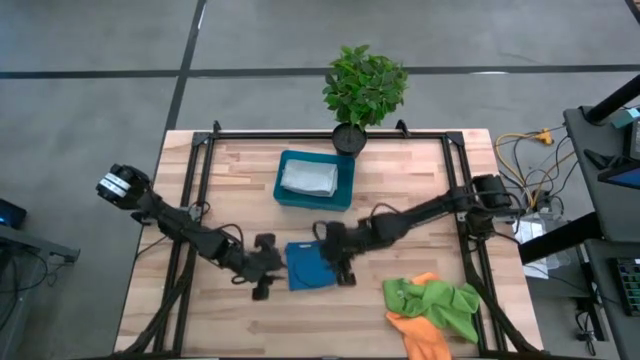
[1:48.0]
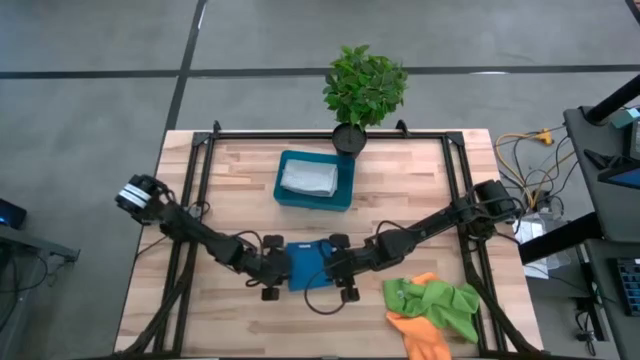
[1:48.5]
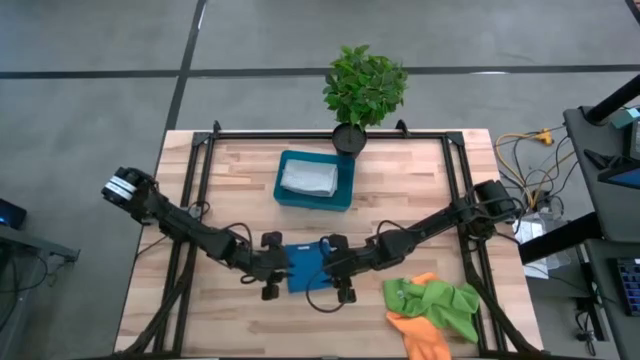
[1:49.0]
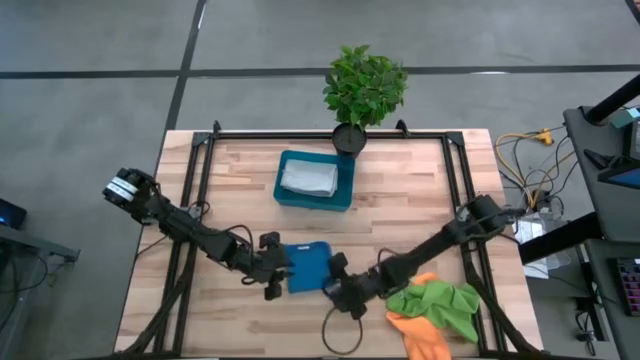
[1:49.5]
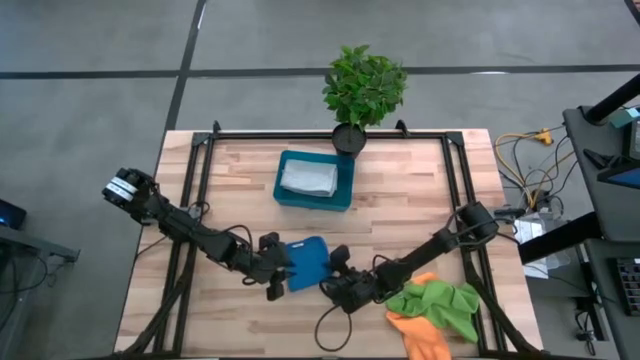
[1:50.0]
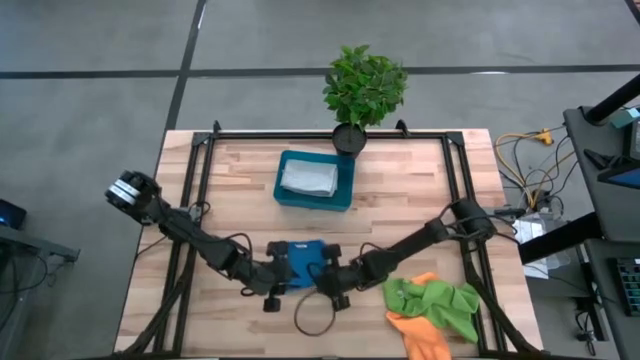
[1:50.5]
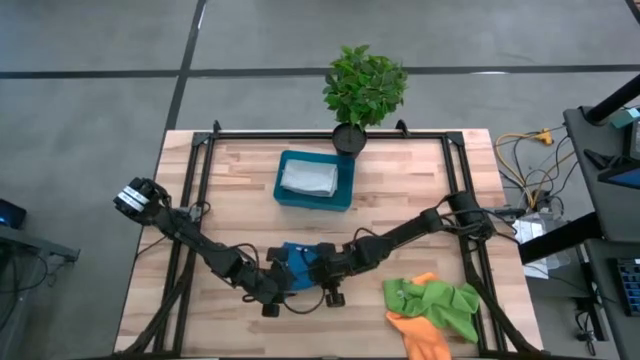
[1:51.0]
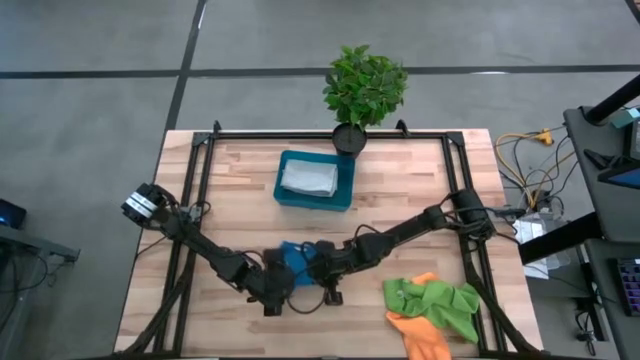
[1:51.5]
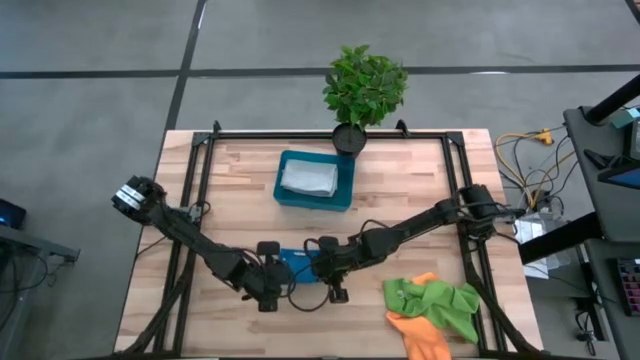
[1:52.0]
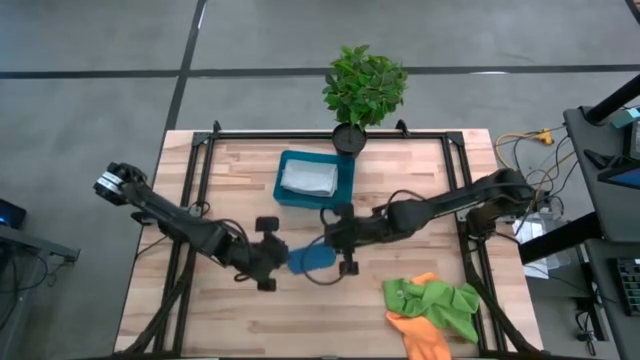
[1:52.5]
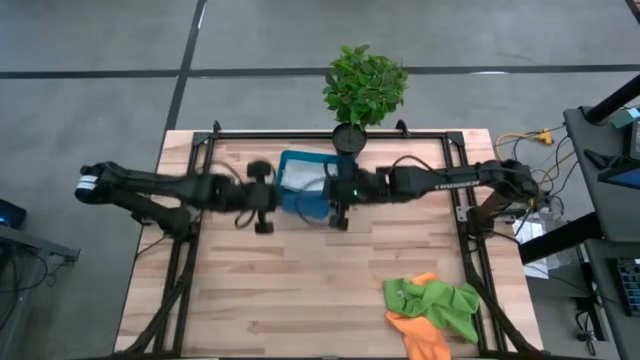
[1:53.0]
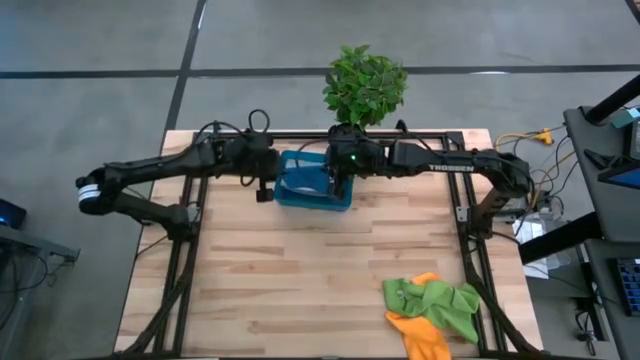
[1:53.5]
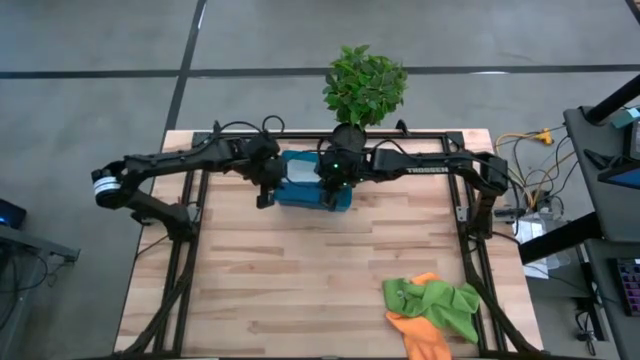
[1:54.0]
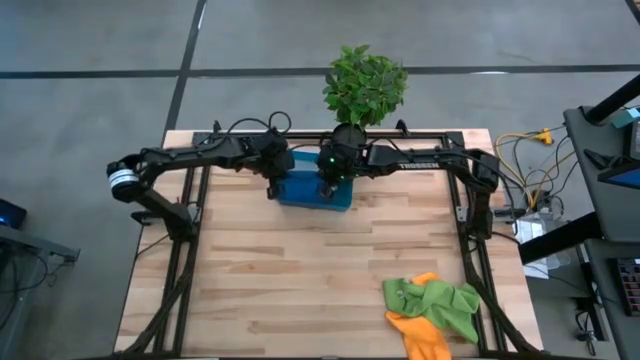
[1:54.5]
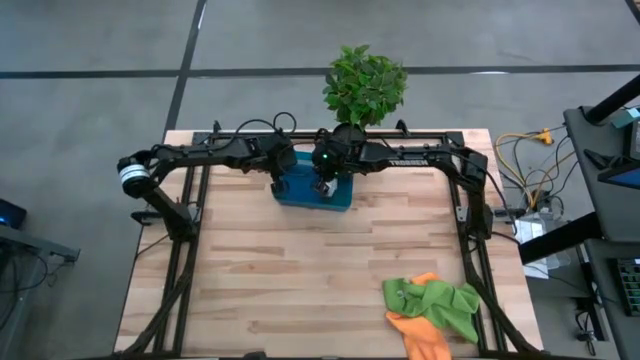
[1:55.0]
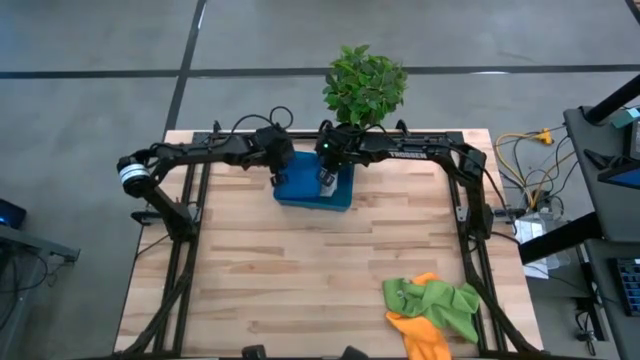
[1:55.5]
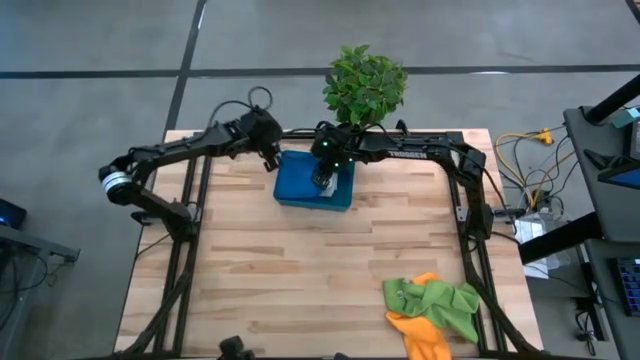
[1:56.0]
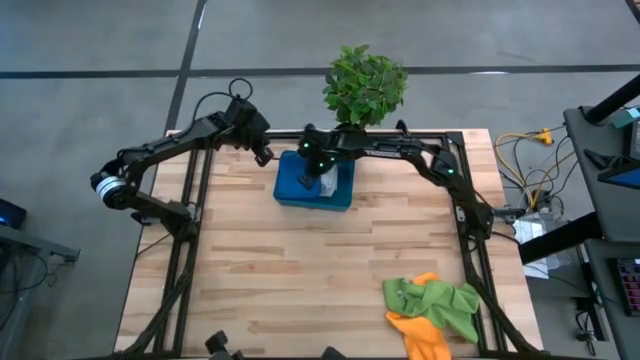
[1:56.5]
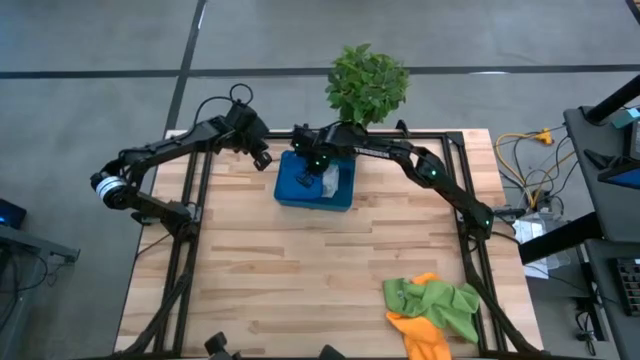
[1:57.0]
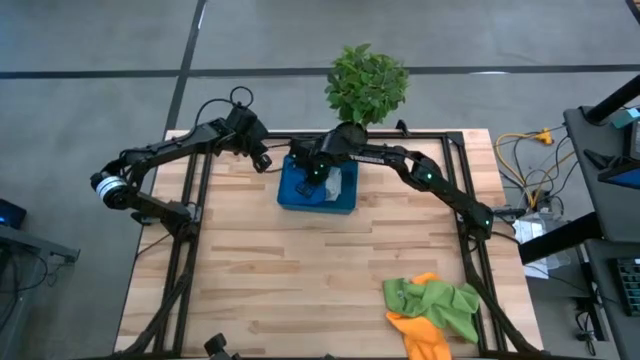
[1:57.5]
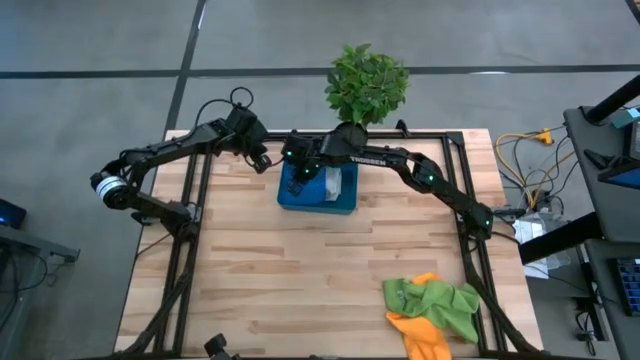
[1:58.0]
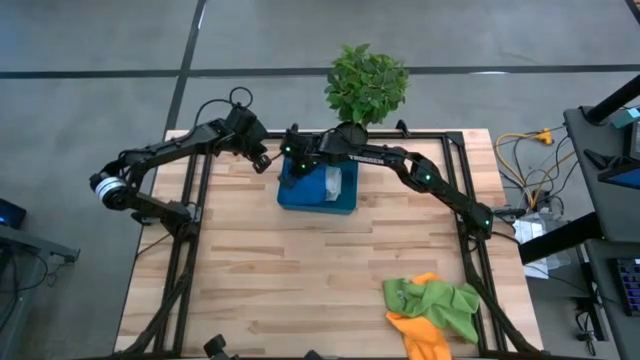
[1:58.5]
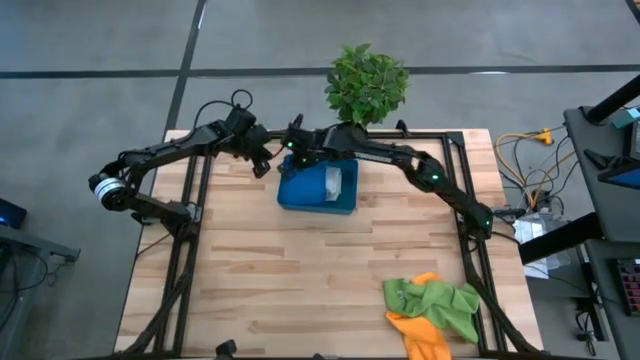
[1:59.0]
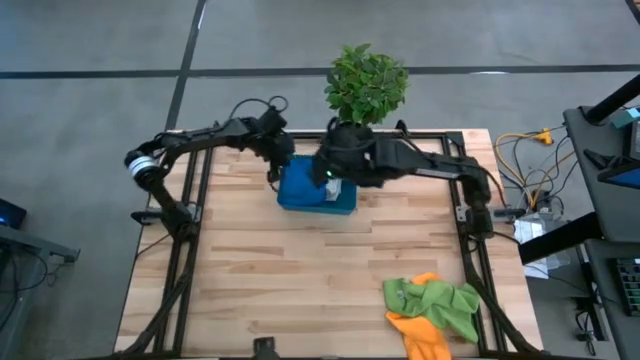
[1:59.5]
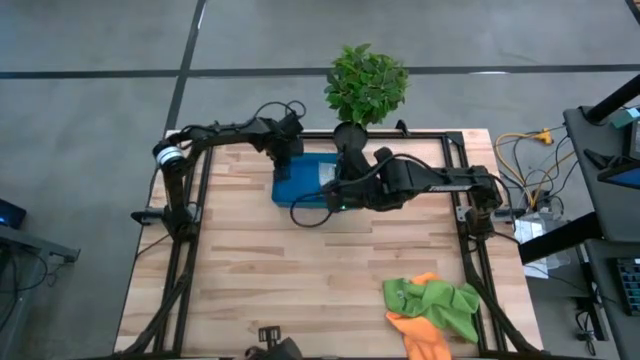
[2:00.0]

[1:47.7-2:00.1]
Task: Fold microfiber towels
Put the blue microfiber towel in the blue bin

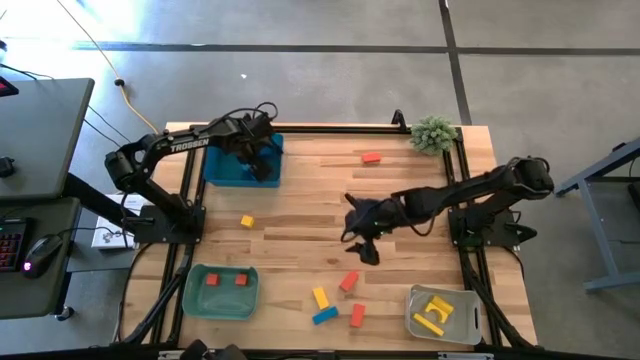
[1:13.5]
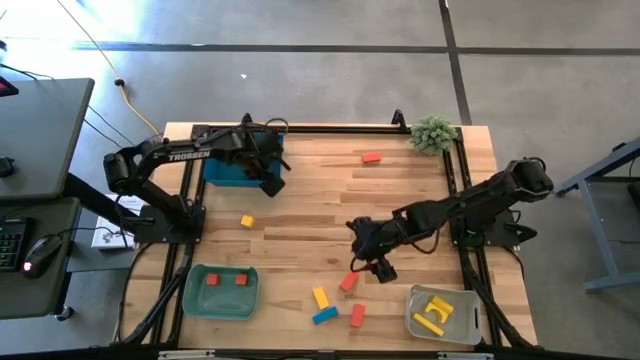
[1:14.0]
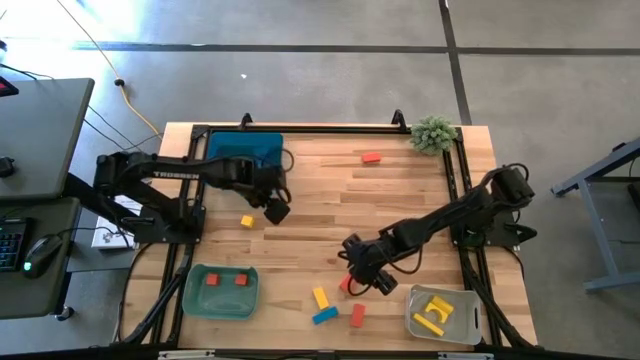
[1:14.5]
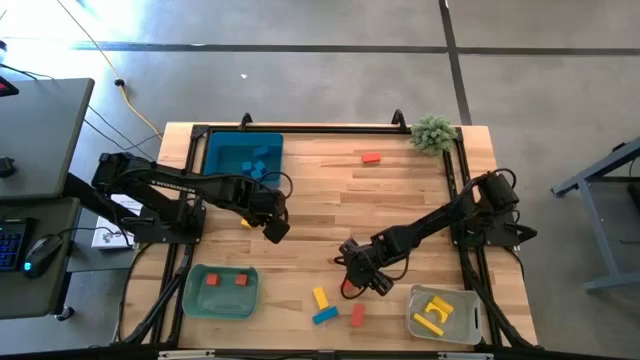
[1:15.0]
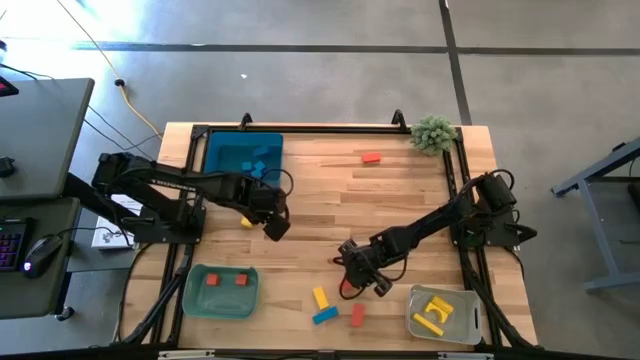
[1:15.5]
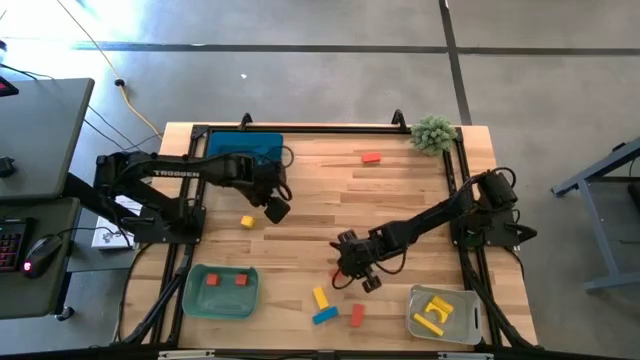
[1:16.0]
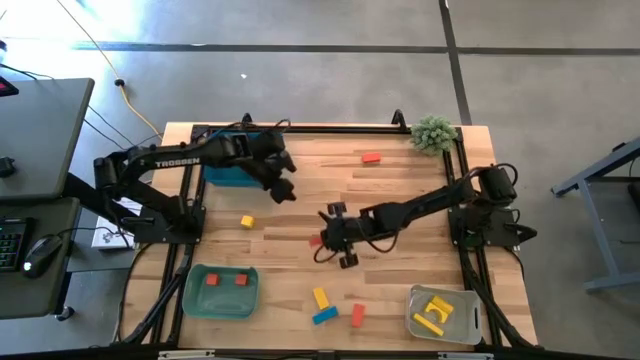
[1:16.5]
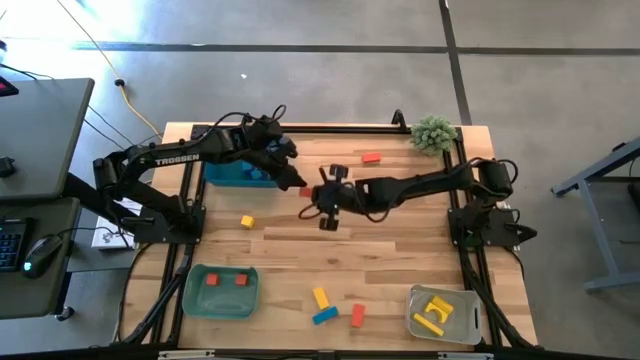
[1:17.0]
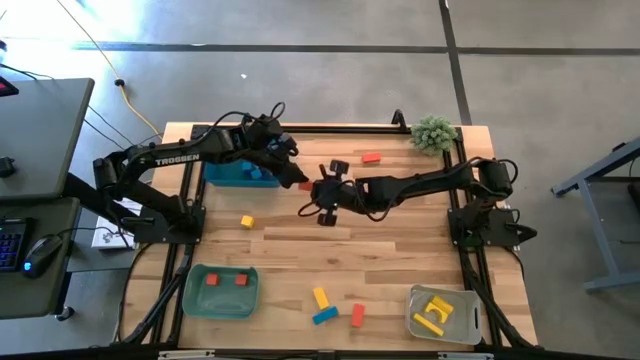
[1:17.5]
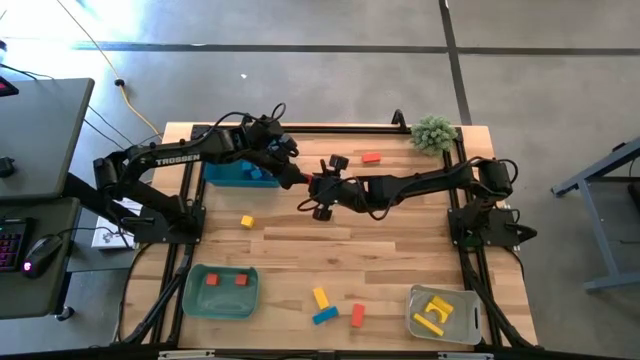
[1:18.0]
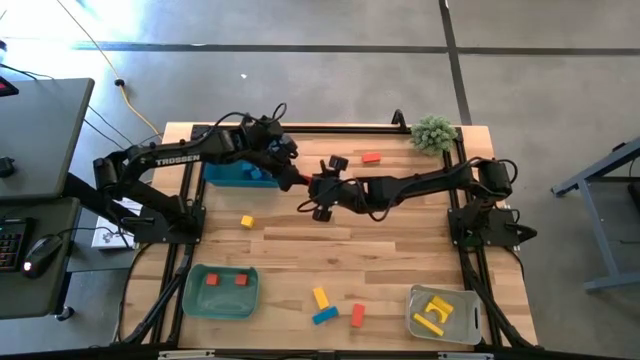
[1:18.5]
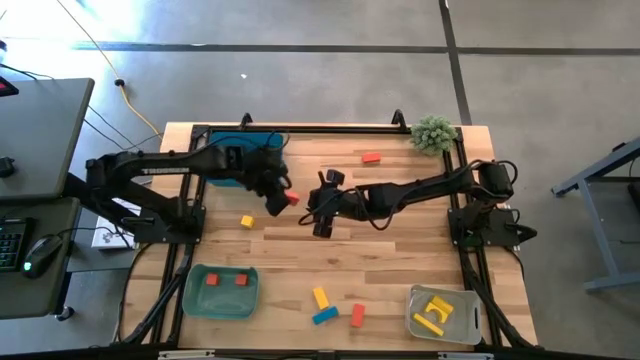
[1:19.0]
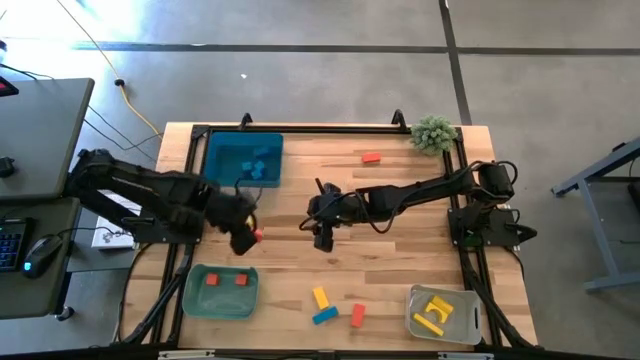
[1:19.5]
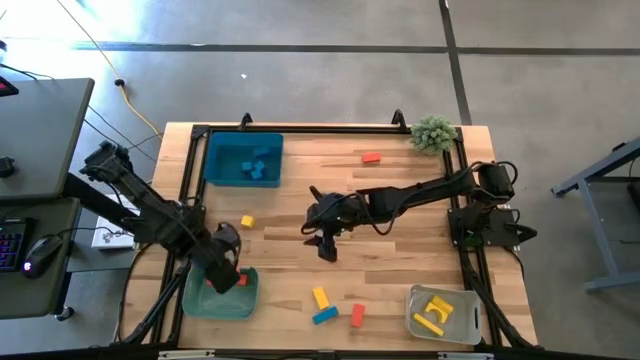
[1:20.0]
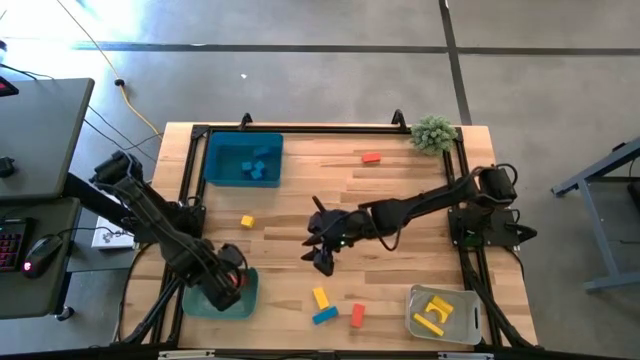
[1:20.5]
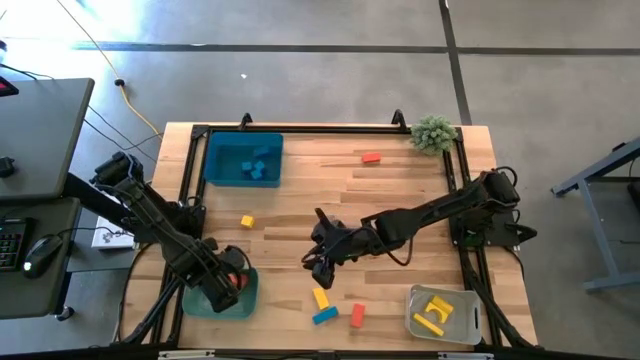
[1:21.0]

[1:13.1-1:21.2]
Task: Sort & place blocks by color
Put the orange block into the green bin
